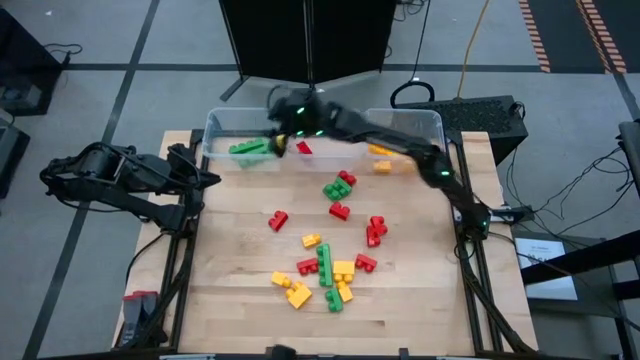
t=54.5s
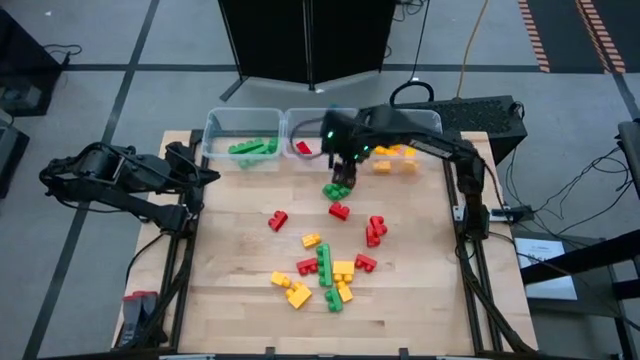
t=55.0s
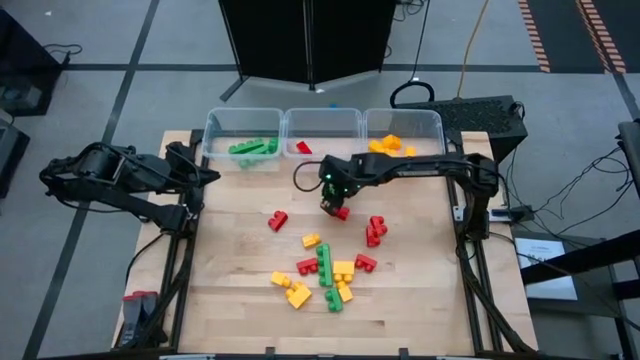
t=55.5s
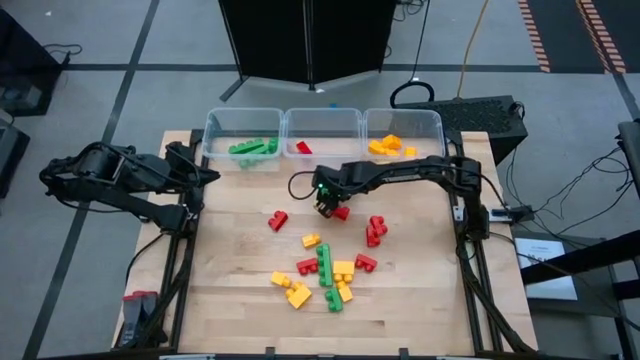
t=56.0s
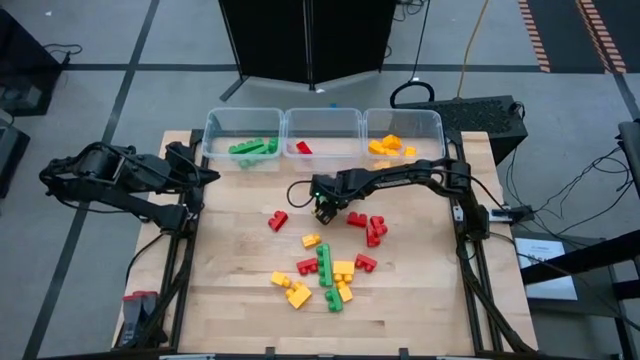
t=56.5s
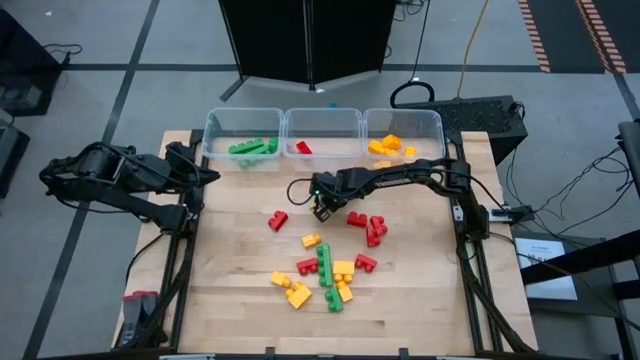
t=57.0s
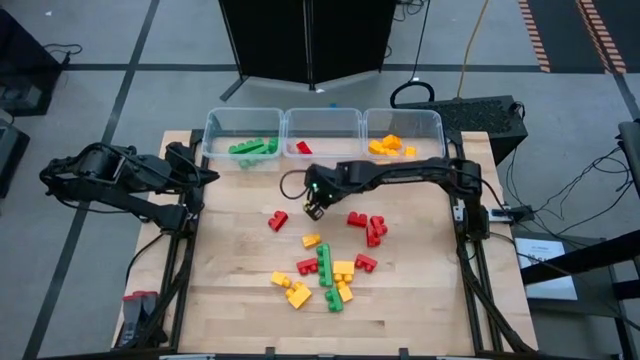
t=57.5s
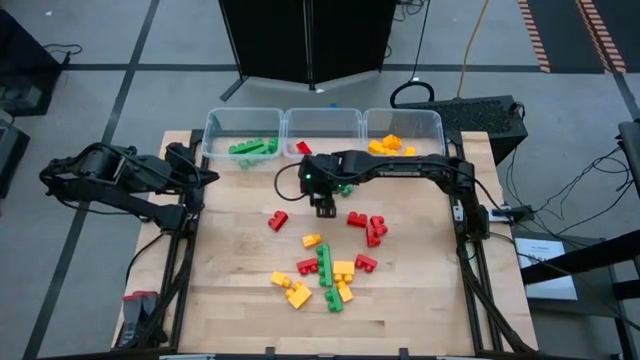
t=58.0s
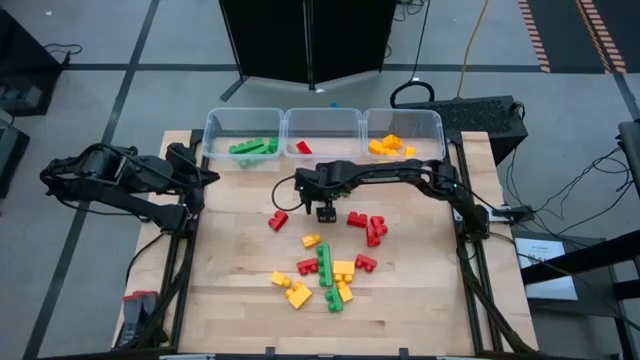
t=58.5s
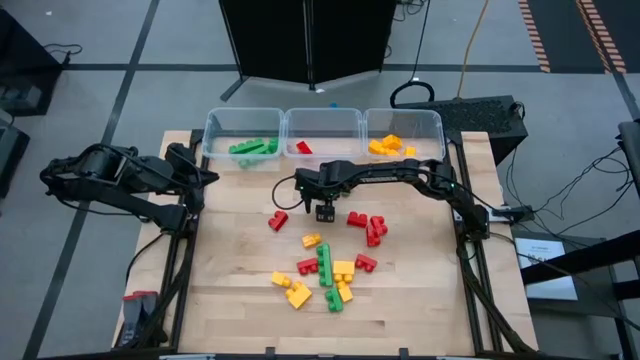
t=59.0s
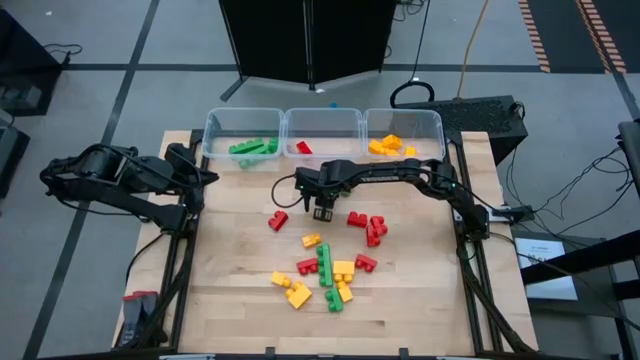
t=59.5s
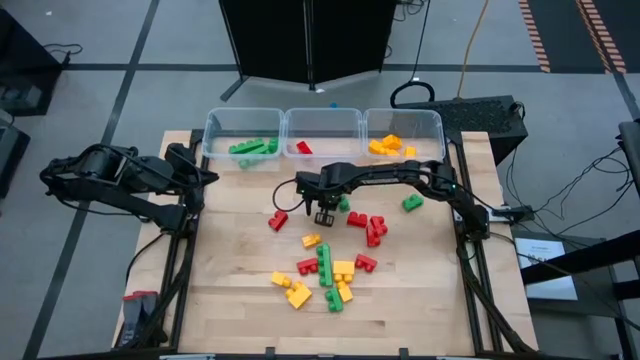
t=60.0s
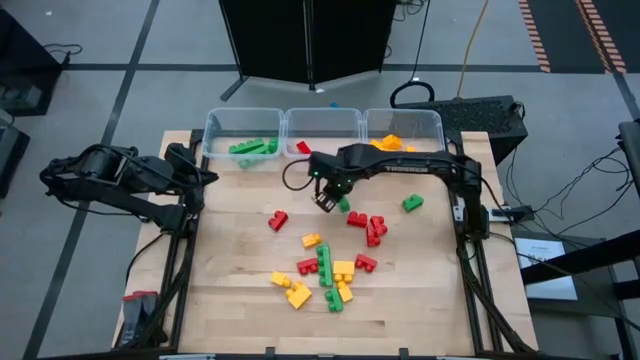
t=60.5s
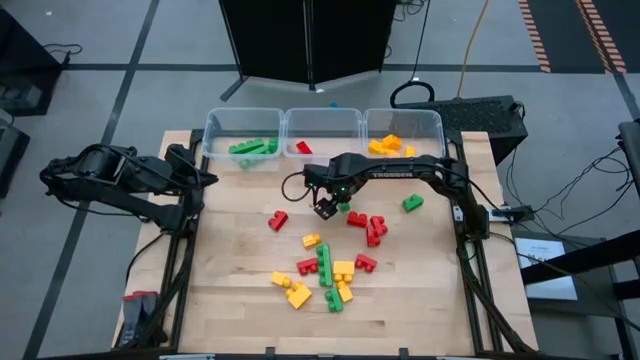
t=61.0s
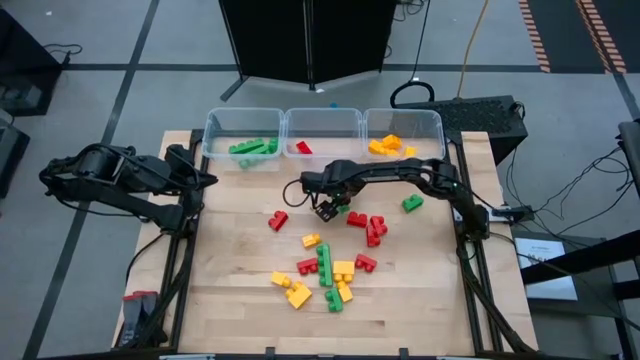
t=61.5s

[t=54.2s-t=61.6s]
Task: Sort blocks
Put the green game piece with 2 studs into the left transparent bin

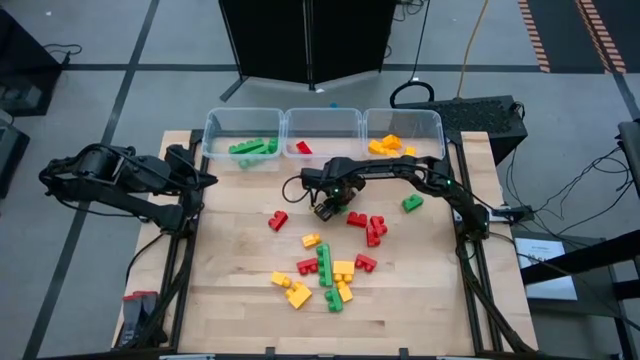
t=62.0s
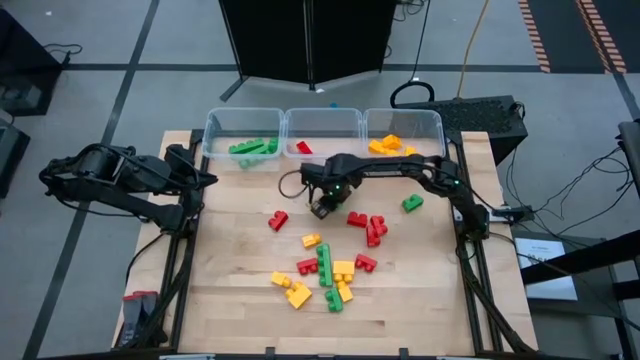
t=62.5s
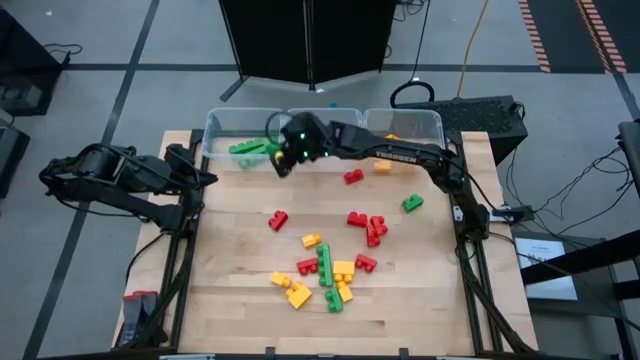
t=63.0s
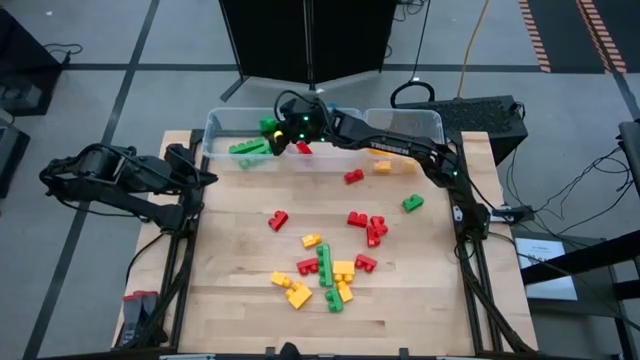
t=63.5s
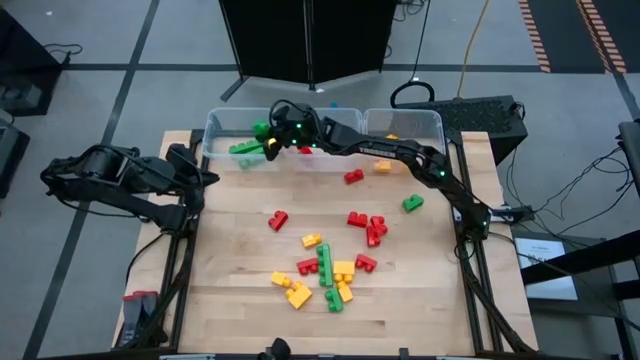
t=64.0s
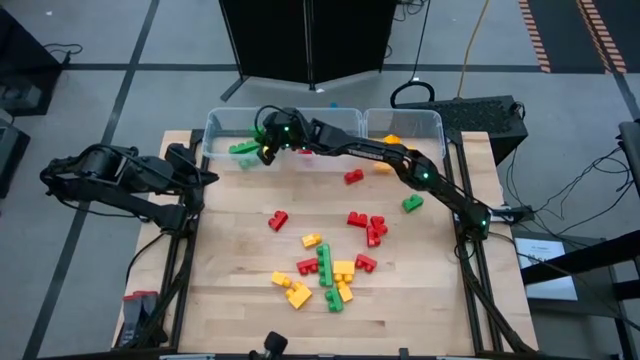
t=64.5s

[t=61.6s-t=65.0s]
Put the green game piece with 2 studs into the left transparent bin

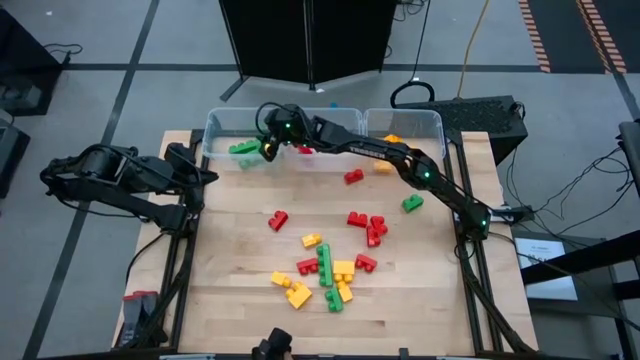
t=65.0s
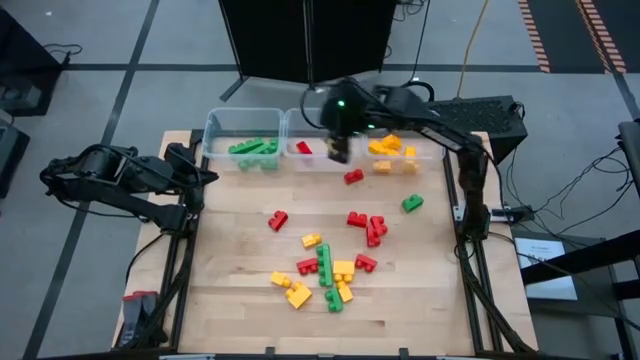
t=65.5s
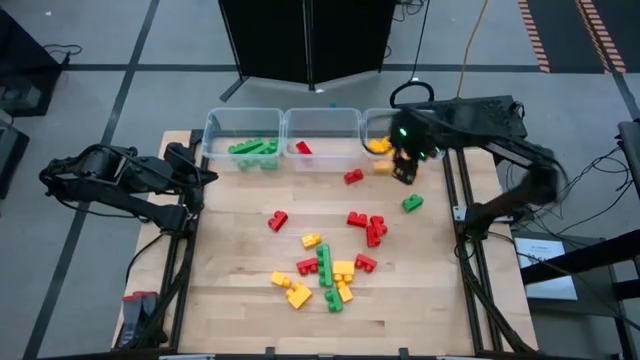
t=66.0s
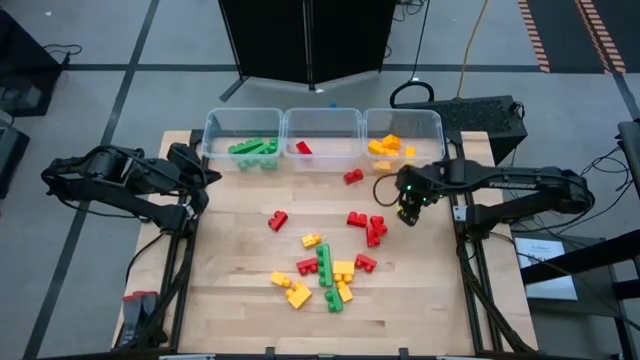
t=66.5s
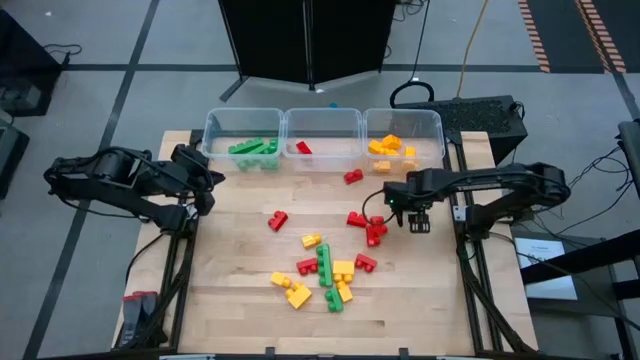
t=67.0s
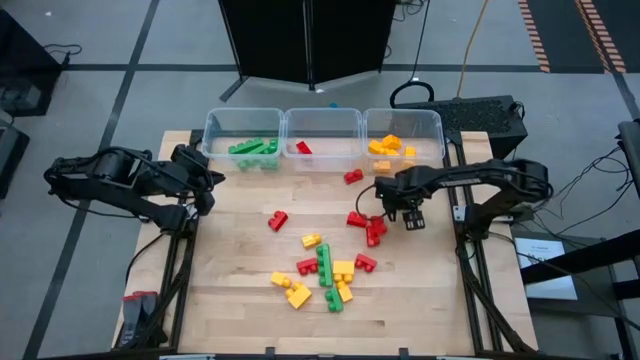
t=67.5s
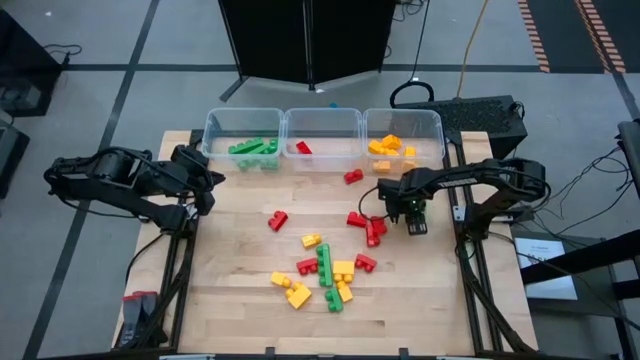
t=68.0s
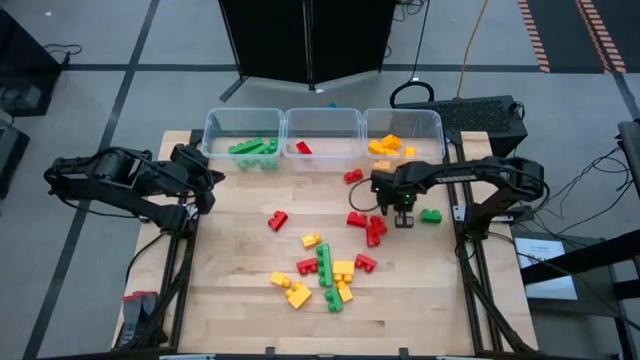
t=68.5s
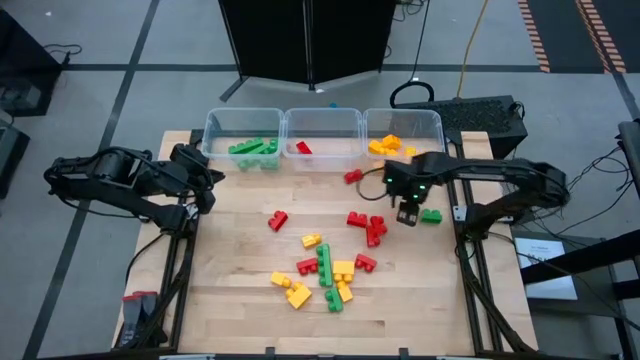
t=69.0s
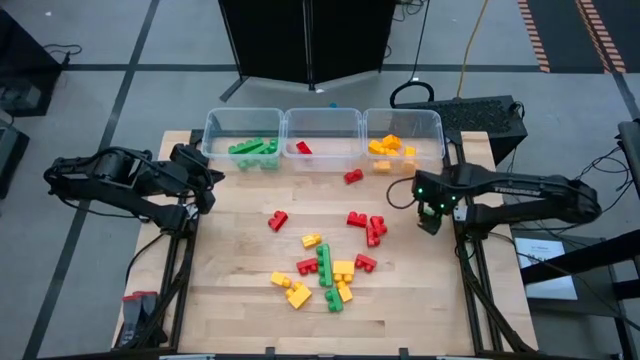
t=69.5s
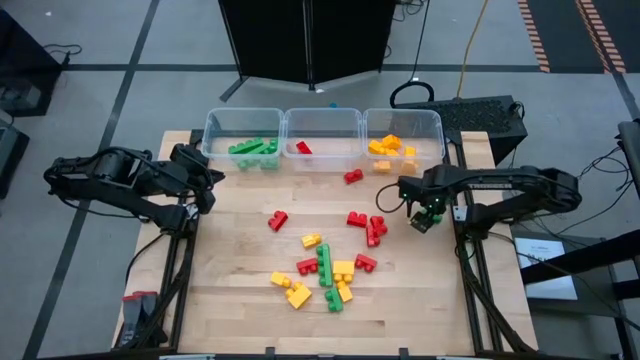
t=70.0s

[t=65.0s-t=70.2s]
Put the green game piece with 2 studs into the left transparent bin

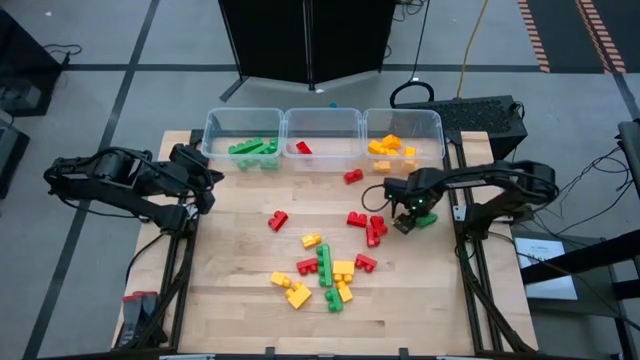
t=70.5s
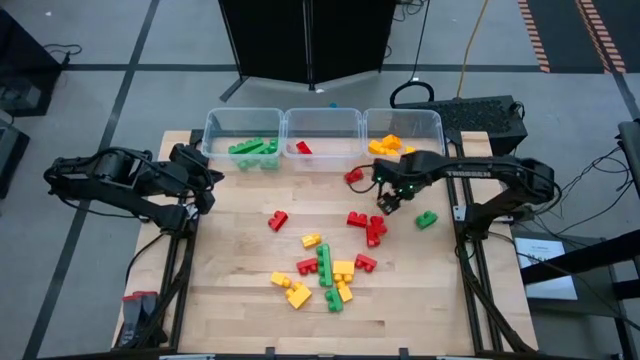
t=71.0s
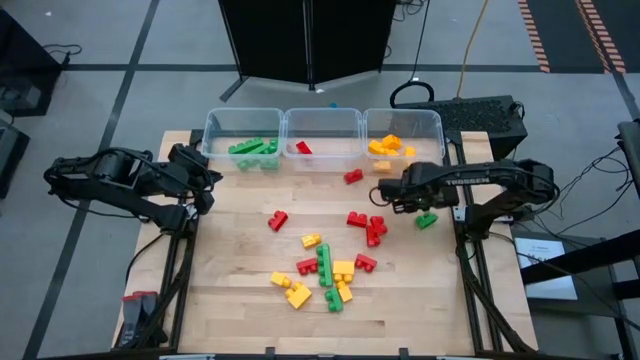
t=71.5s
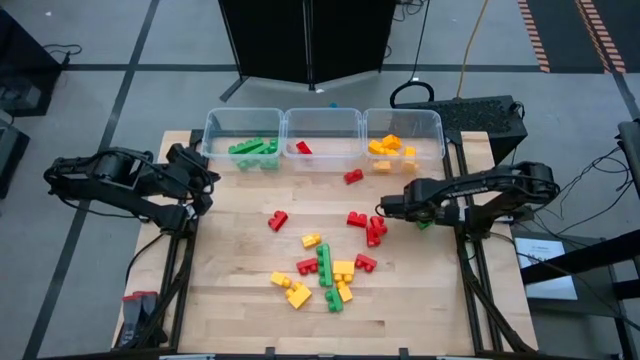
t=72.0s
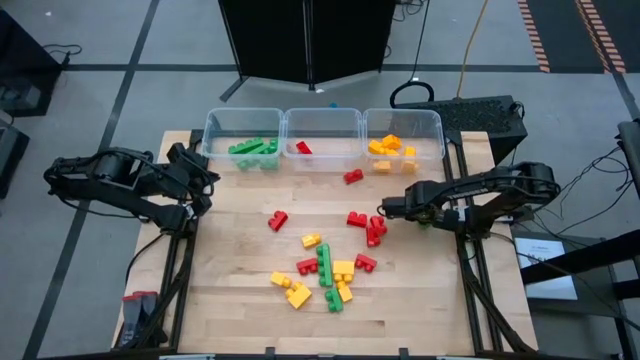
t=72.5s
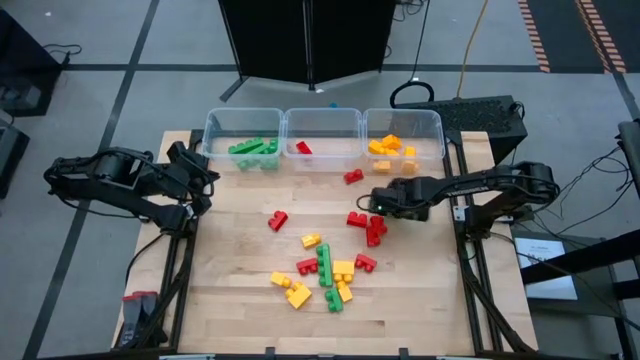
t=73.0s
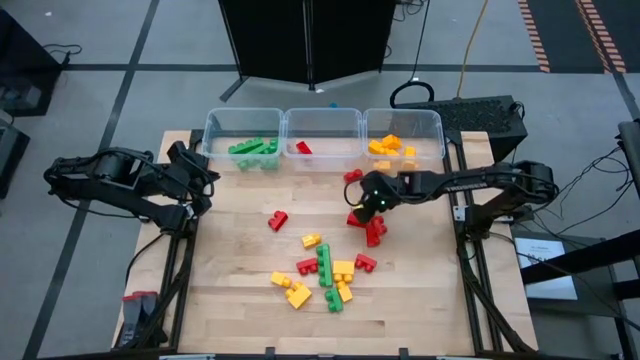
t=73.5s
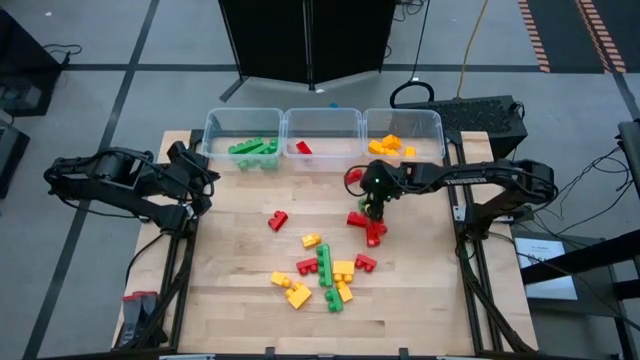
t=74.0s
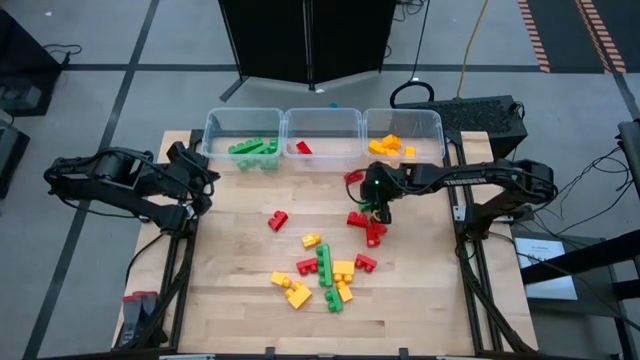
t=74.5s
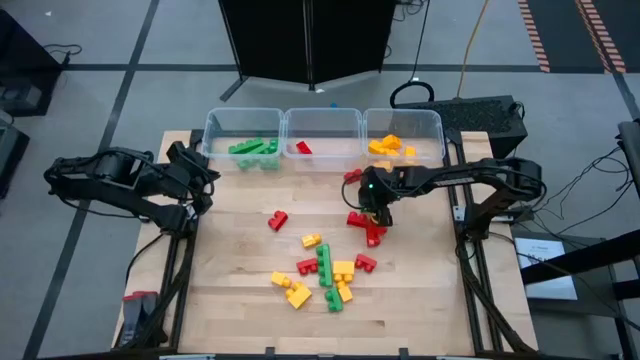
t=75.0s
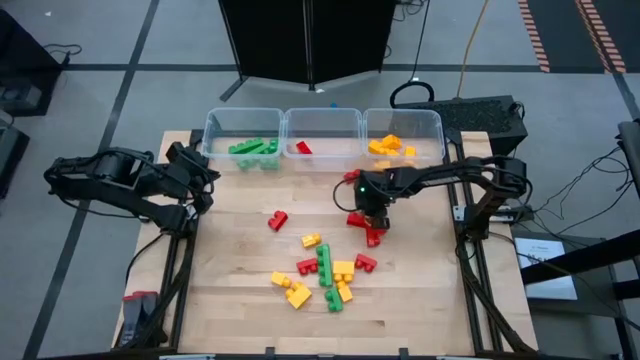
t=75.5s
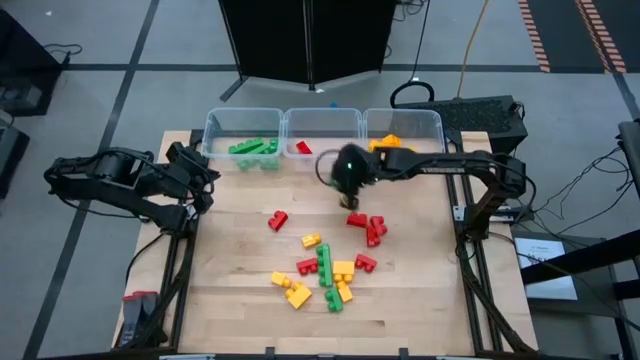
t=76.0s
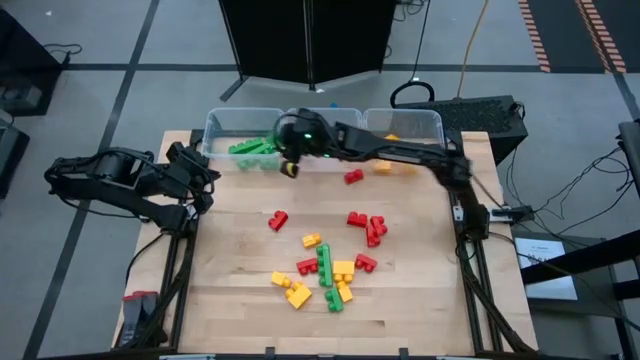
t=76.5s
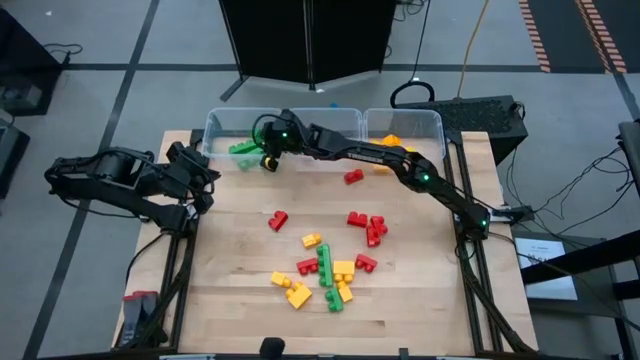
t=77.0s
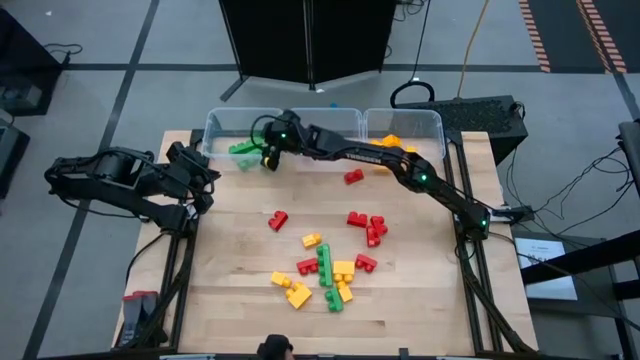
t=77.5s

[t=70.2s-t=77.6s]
Put the green game piece with 2 studs into the left transparent bin
